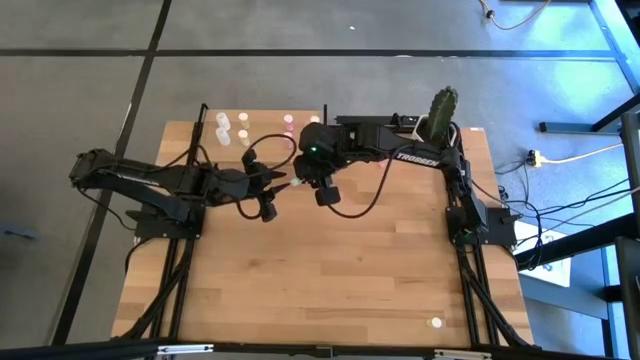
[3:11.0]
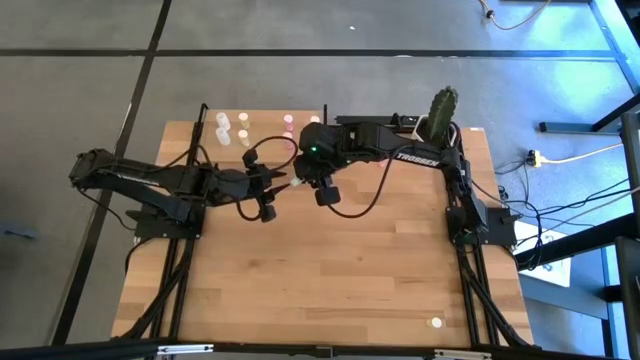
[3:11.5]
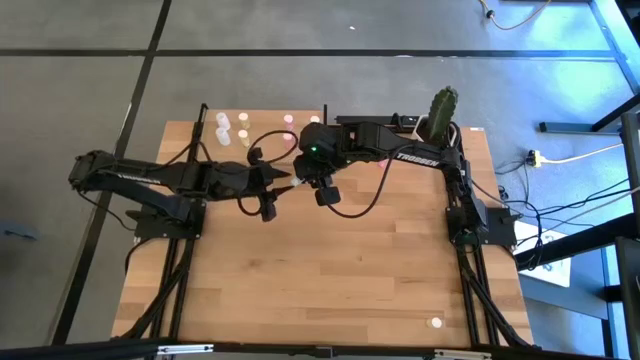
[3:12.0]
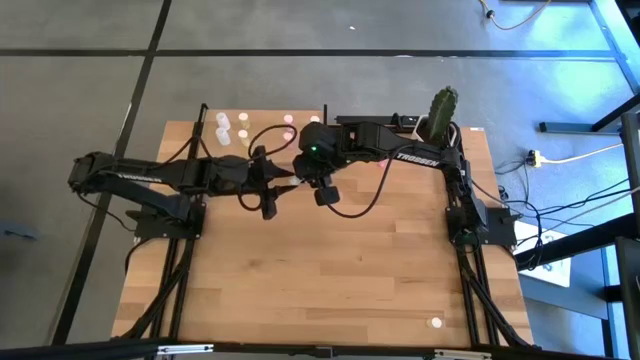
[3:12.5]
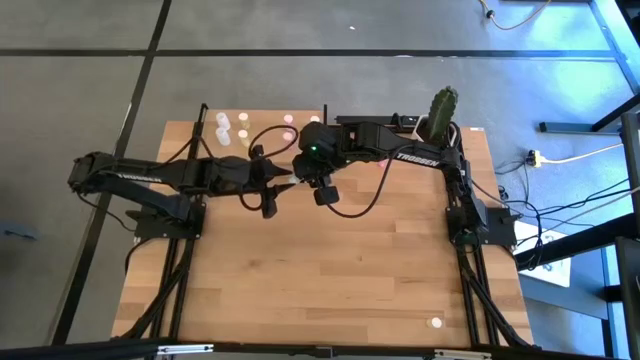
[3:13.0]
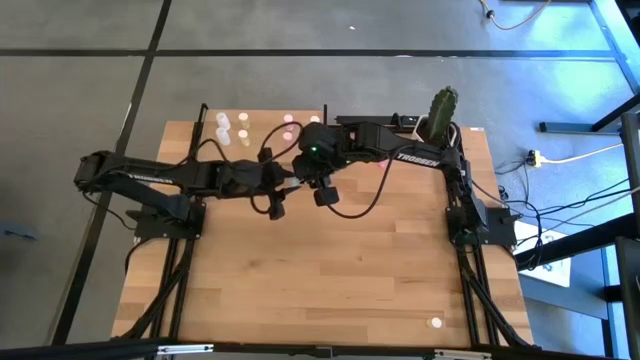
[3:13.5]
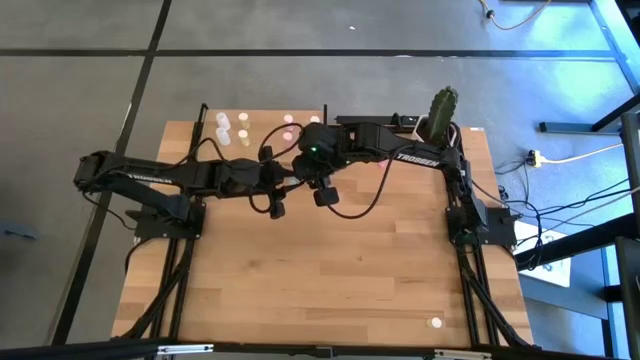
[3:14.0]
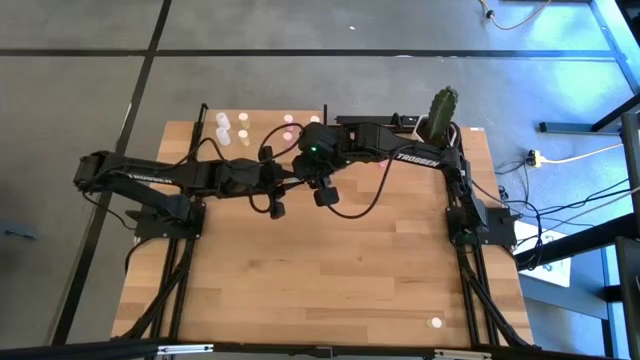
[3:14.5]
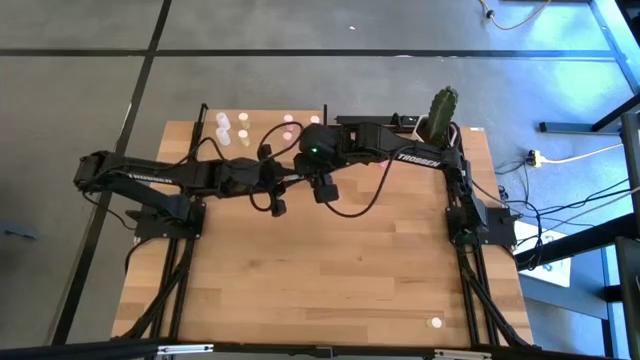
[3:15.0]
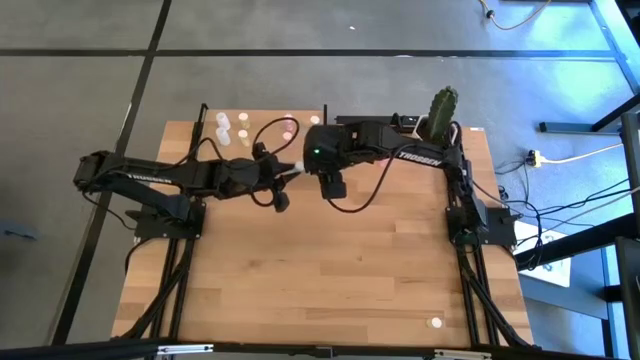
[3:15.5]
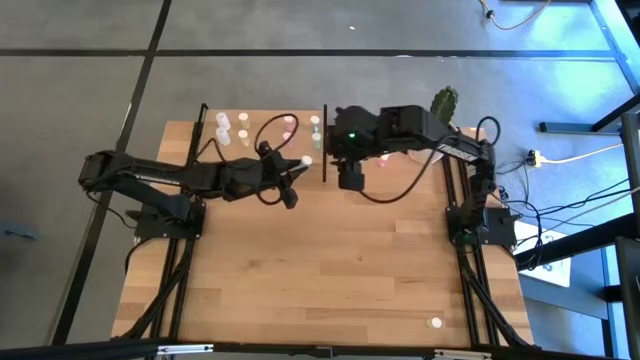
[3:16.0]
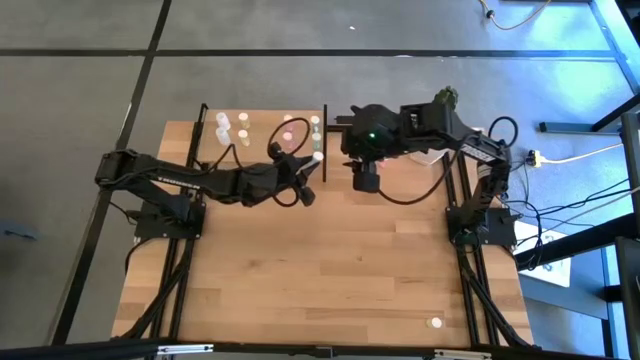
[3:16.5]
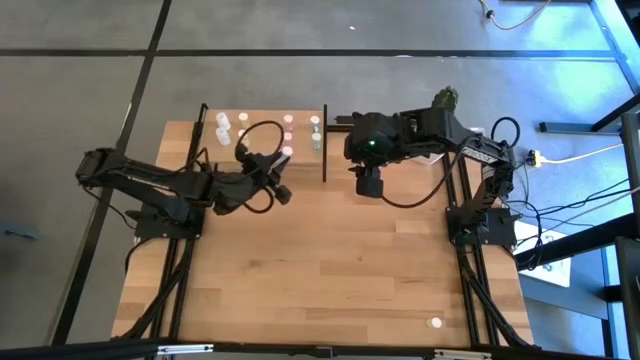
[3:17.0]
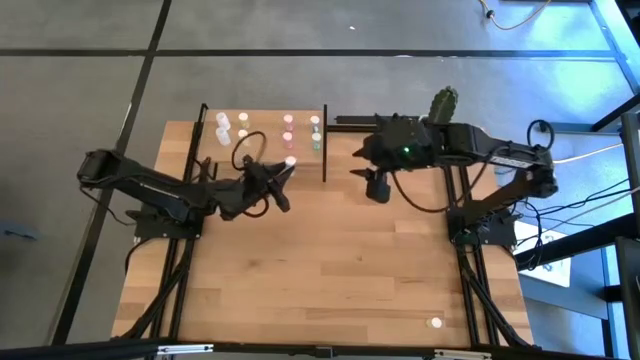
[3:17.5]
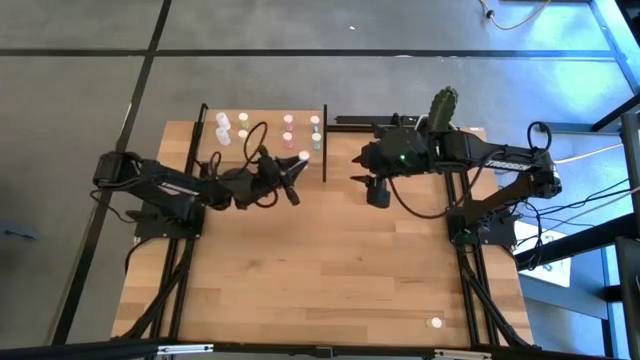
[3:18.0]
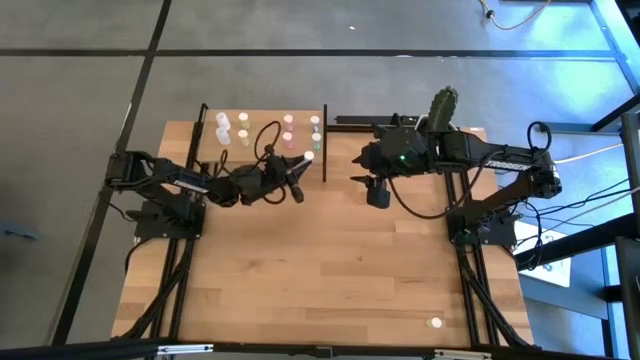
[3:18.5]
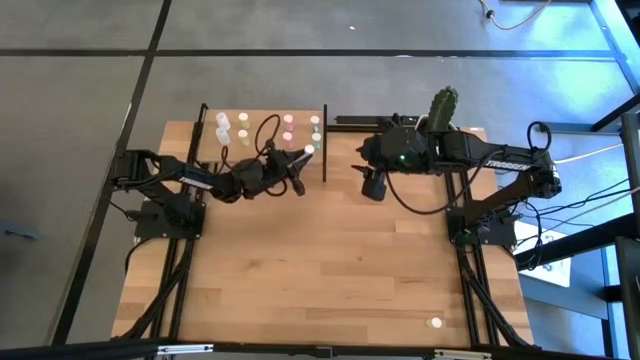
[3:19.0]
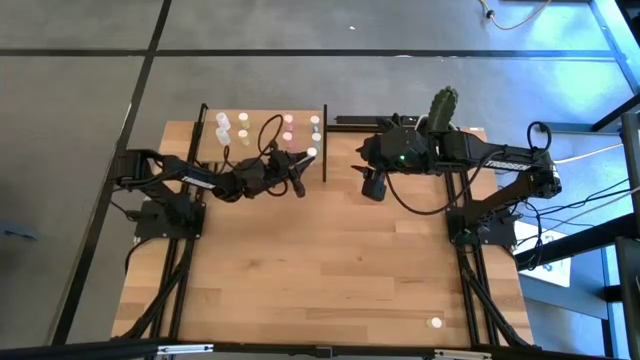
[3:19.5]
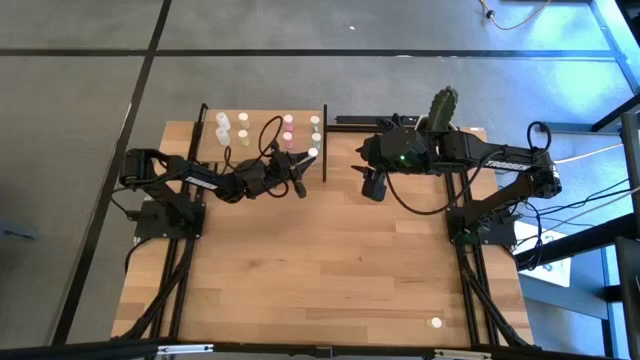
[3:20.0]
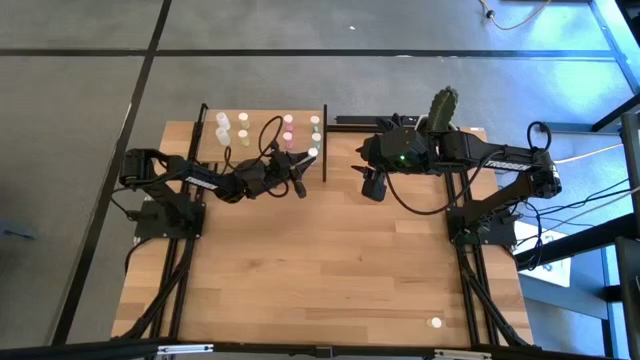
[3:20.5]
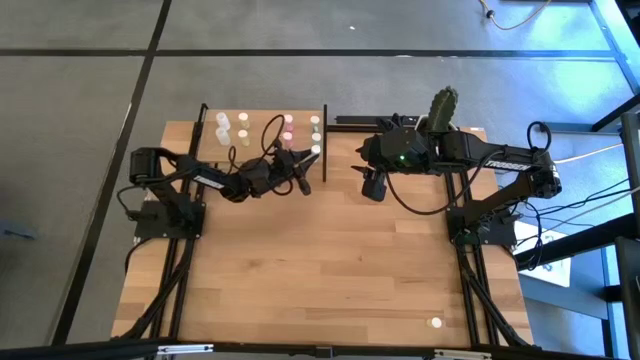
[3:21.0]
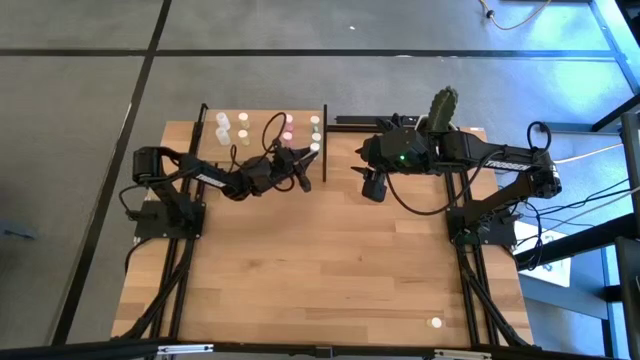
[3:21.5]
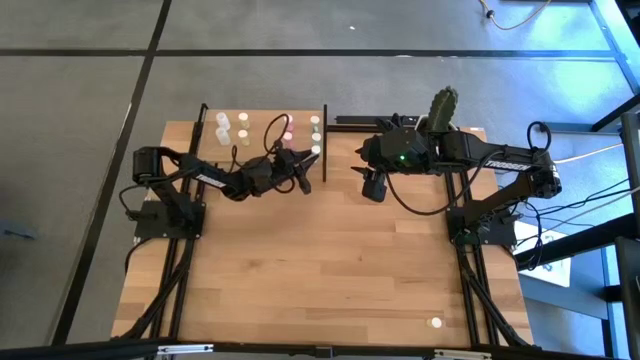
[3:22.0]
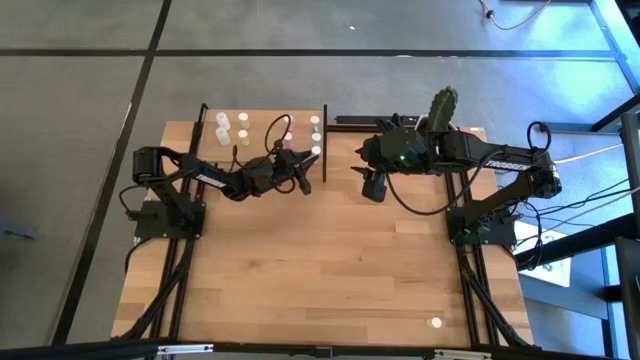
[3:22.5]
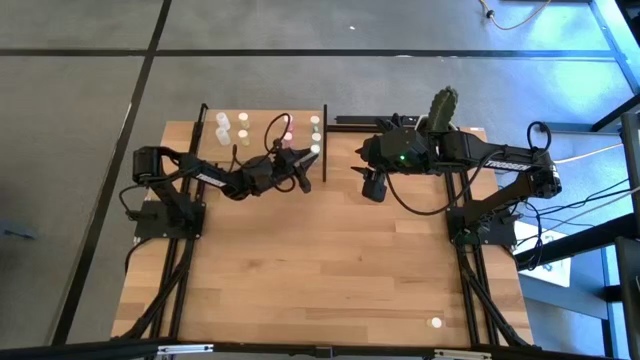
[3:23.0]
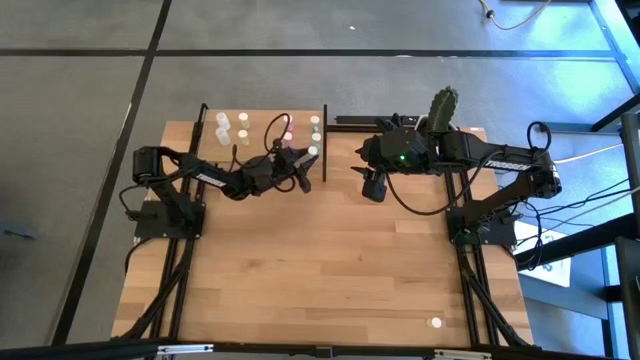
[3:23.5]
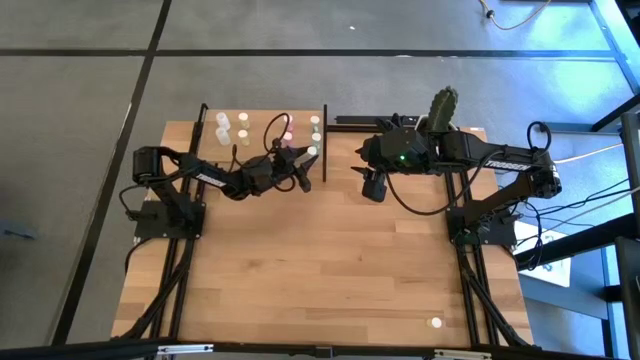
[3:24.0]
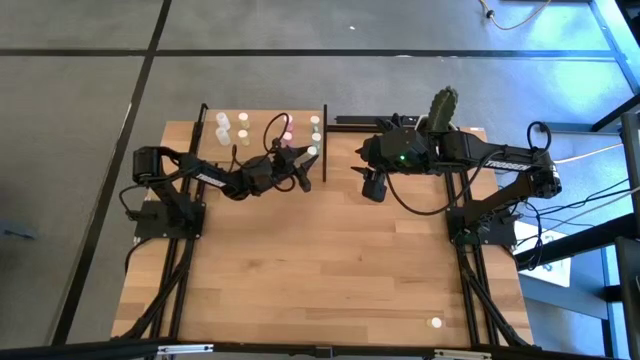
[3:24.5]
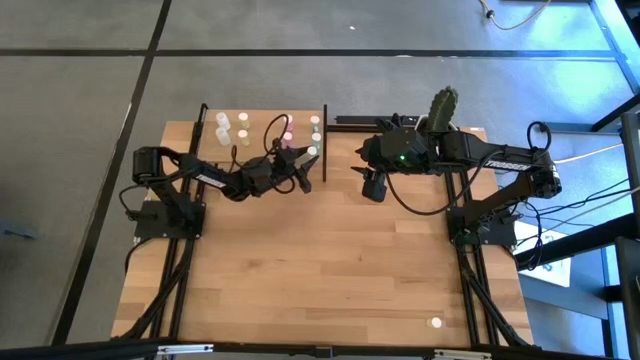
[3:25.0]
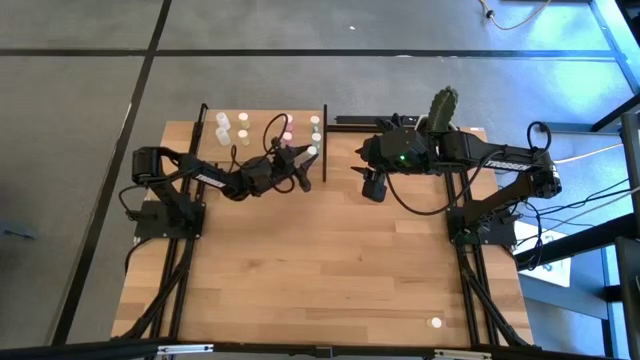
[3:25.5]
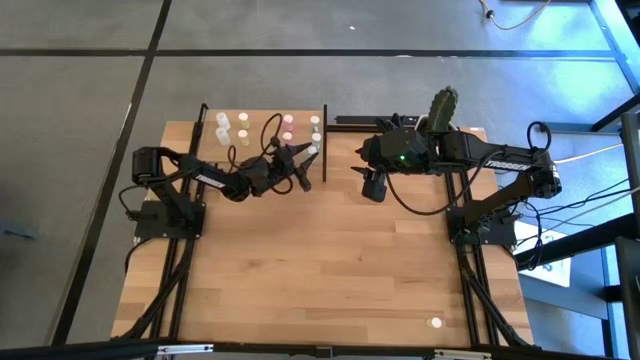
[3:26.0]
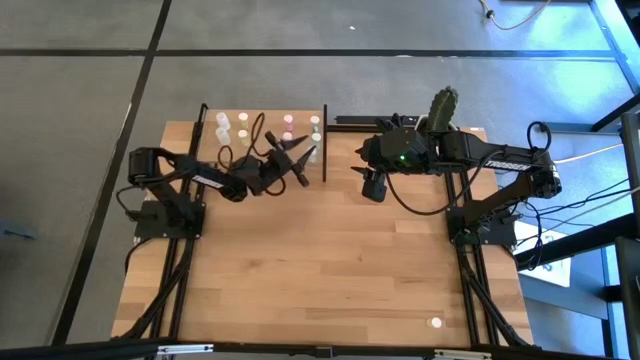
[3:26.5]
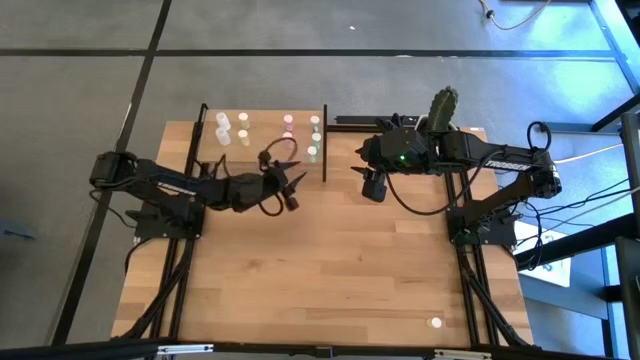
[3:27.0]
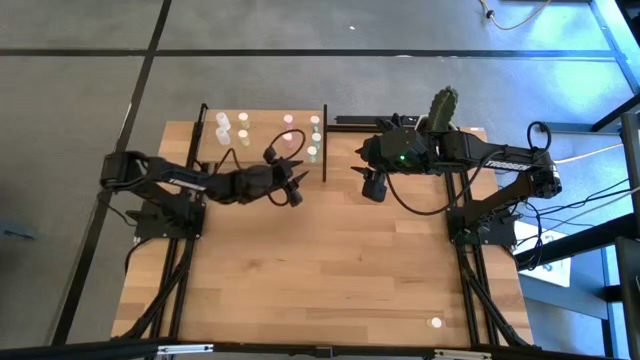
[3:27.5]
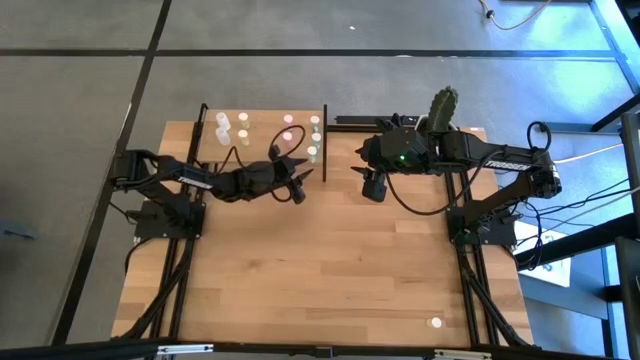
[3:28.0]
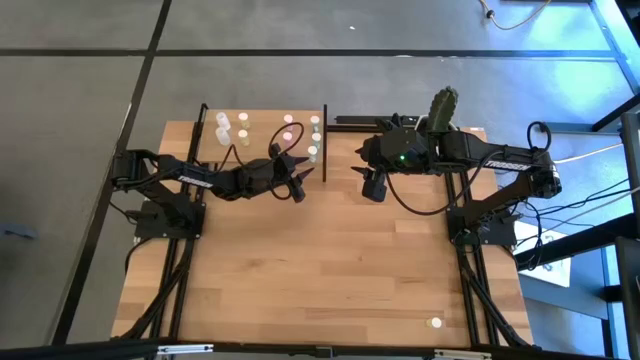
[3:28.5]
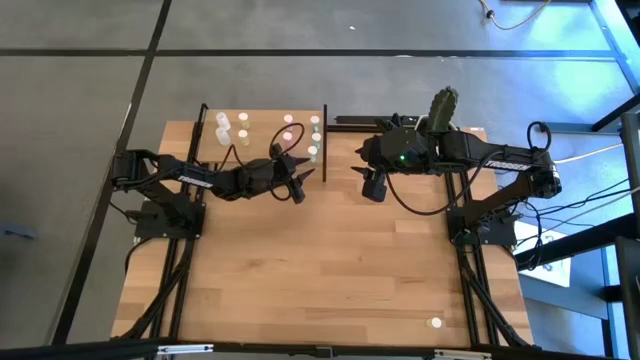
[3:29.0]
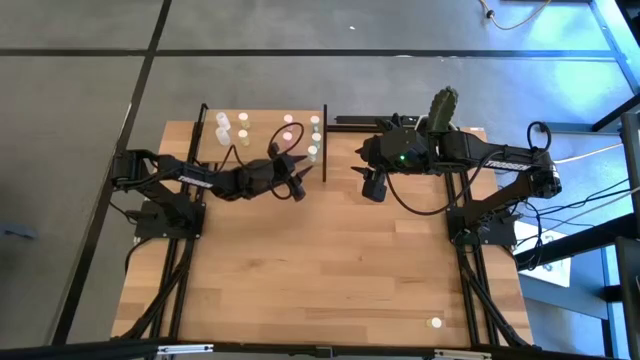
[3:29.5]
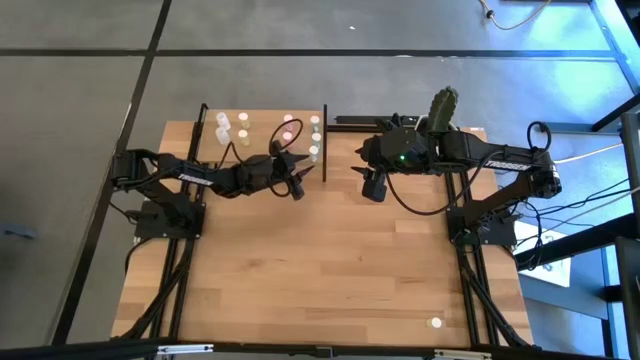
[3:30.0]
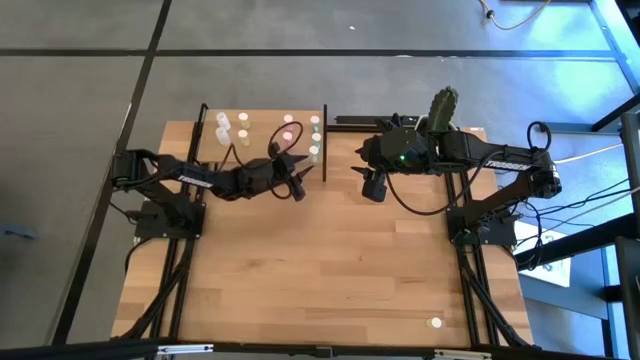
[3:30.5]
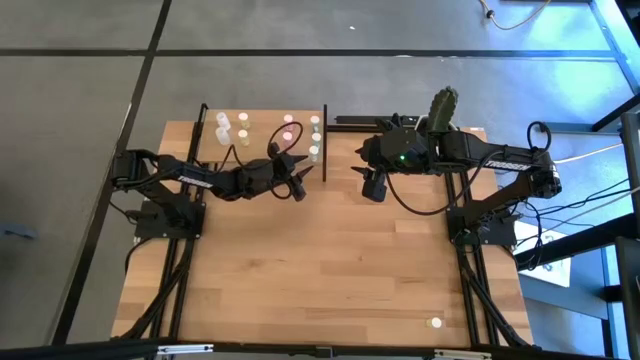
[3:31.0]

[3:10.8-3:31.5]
Task: Pick and place medicine bottles onto shelf by color
Put the green pill bottle on the shelf and align it with the other green pill bottles

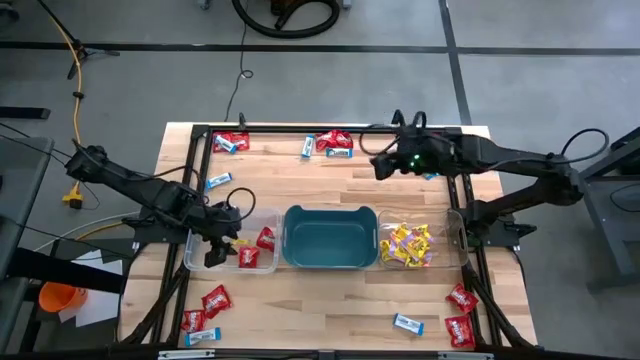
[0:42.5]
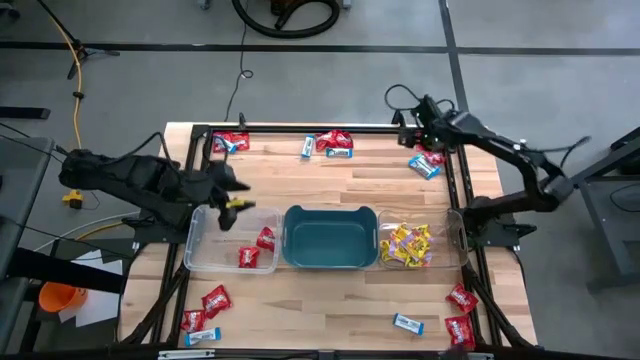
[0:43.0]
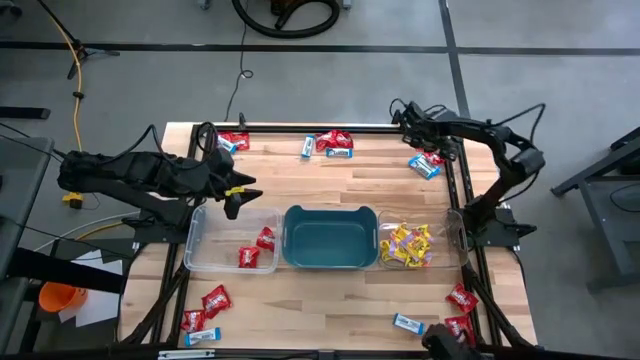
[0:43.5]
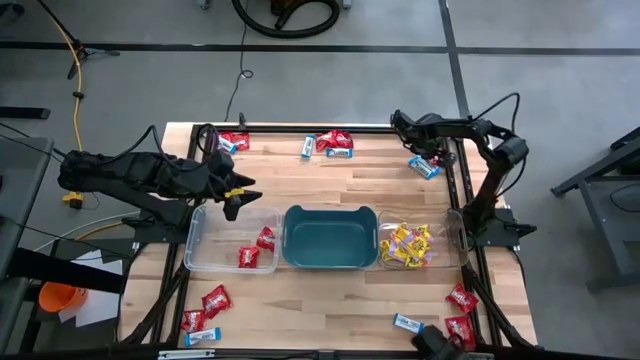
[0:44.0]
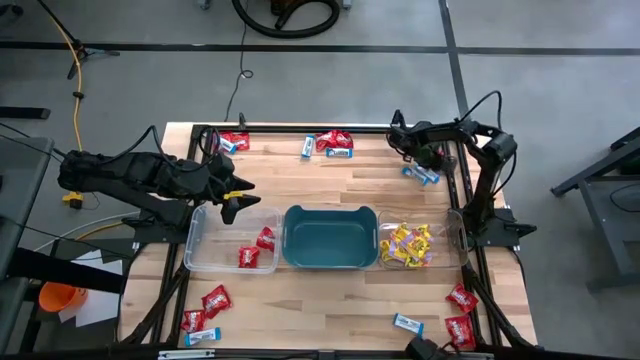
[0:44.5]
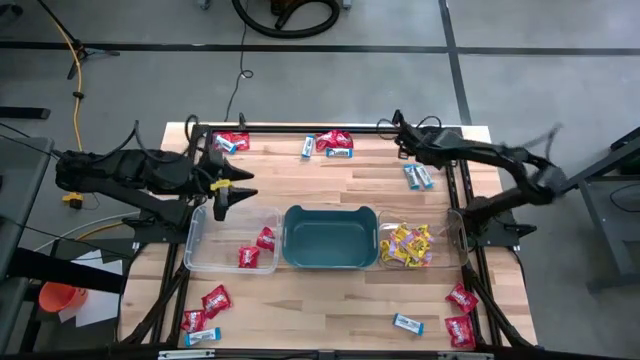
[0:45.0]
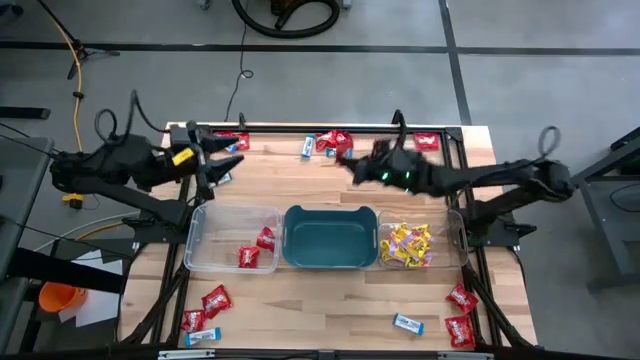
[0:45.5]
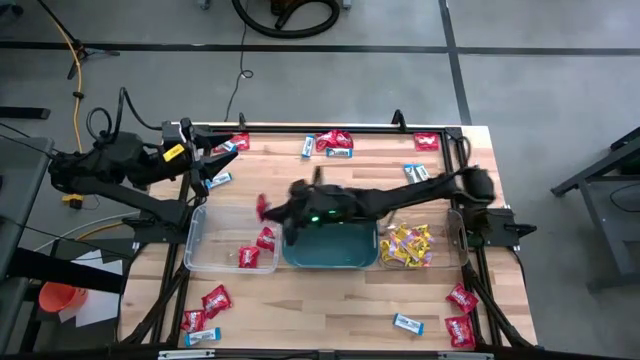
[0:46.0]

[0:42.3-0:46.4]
Task: Sort candy
Put the red candy into the left transparent bin
